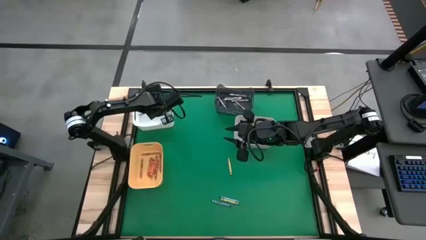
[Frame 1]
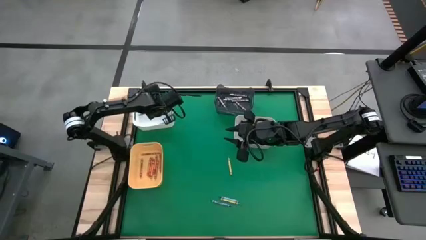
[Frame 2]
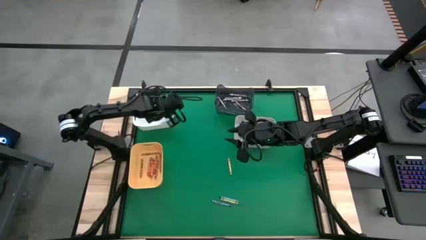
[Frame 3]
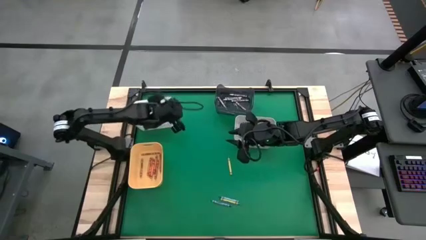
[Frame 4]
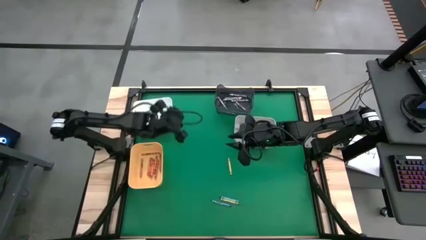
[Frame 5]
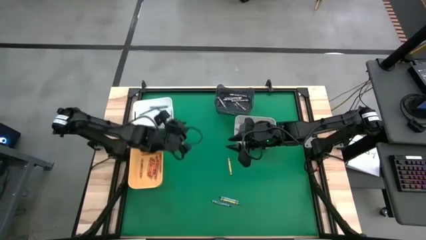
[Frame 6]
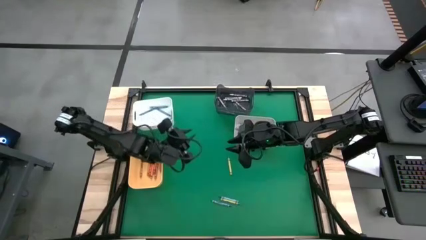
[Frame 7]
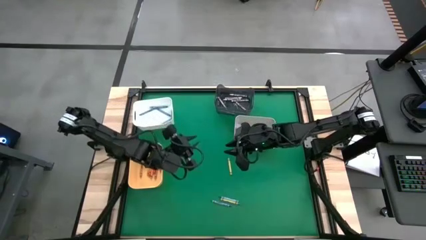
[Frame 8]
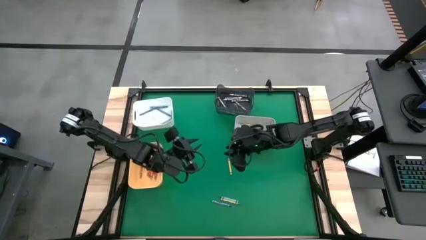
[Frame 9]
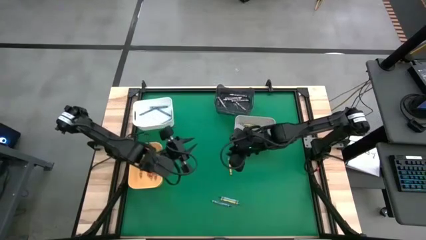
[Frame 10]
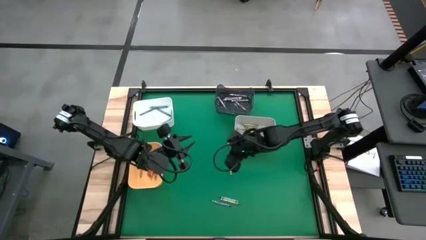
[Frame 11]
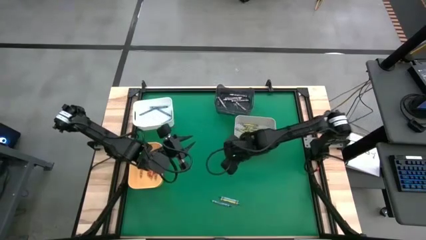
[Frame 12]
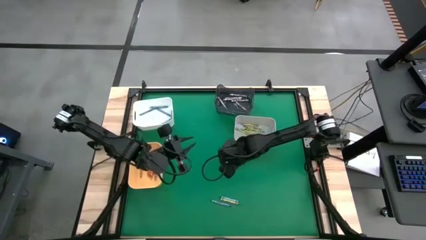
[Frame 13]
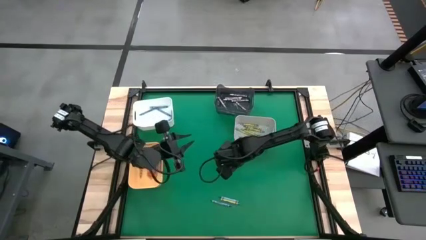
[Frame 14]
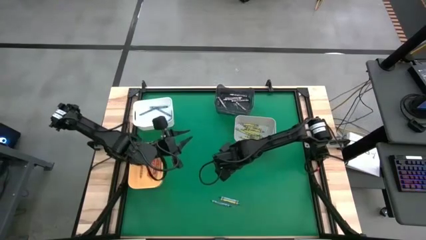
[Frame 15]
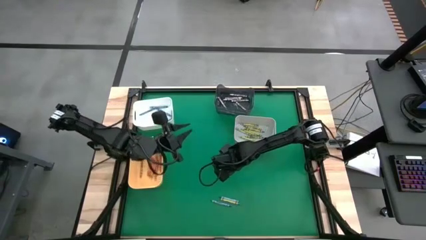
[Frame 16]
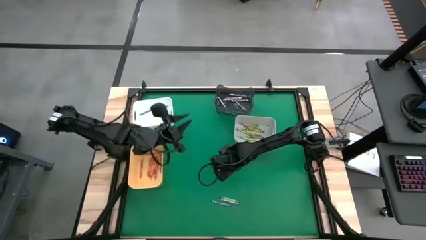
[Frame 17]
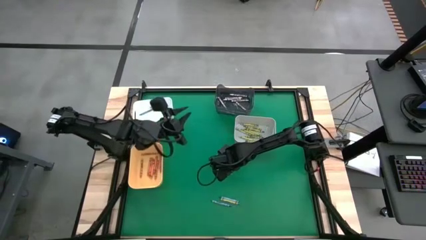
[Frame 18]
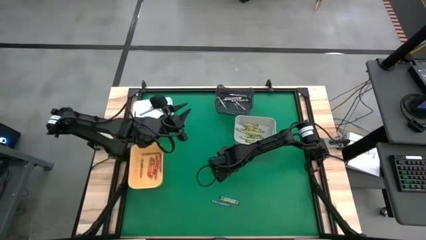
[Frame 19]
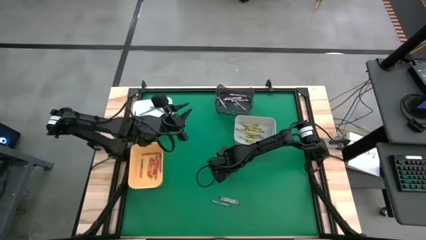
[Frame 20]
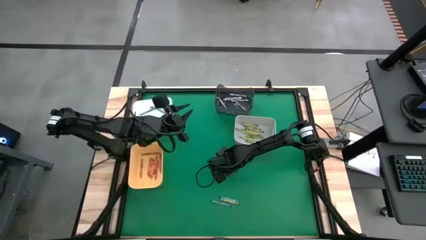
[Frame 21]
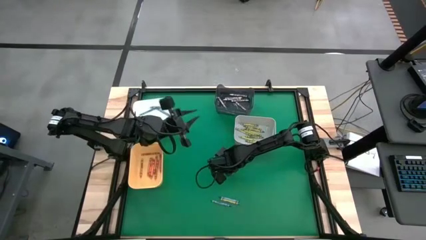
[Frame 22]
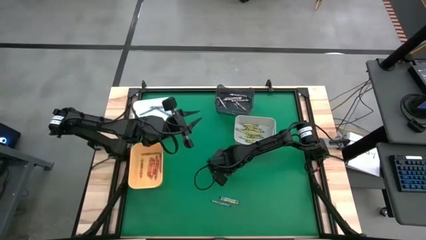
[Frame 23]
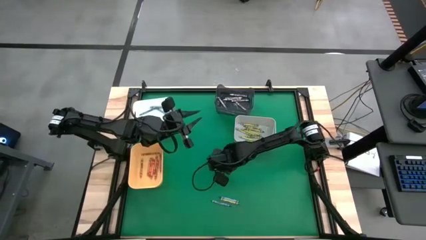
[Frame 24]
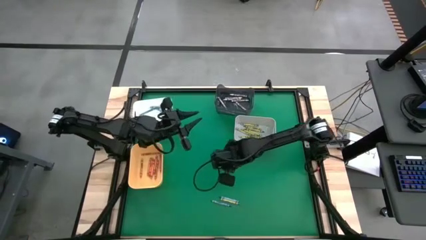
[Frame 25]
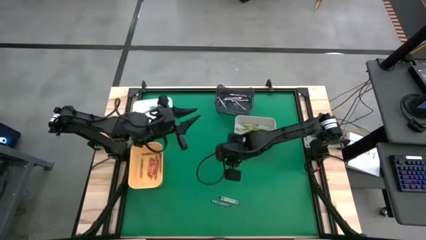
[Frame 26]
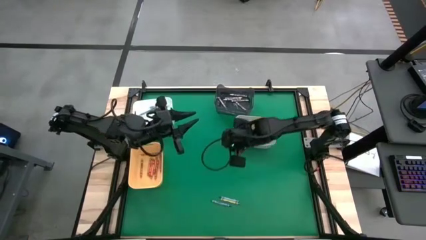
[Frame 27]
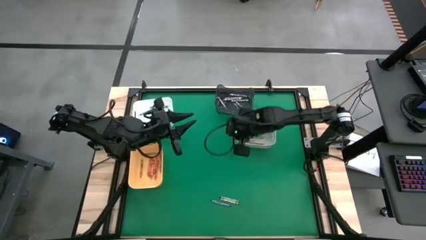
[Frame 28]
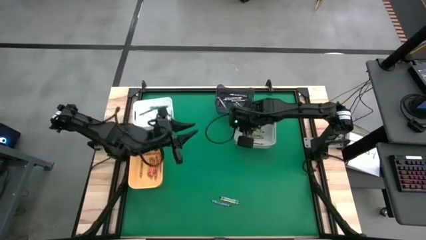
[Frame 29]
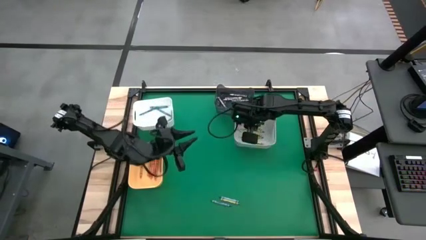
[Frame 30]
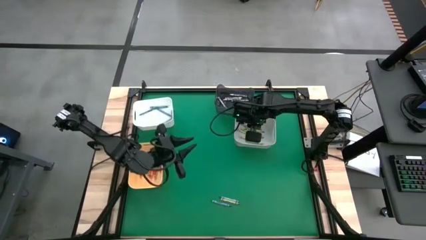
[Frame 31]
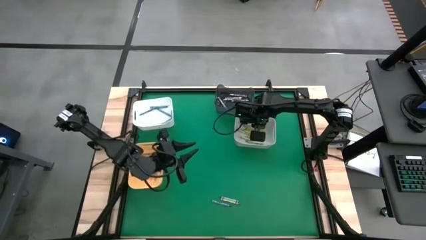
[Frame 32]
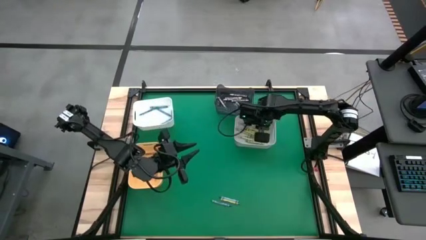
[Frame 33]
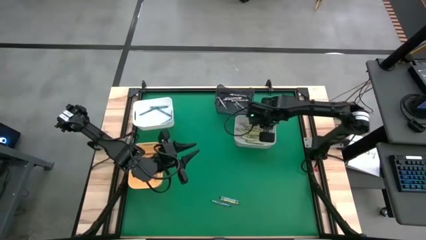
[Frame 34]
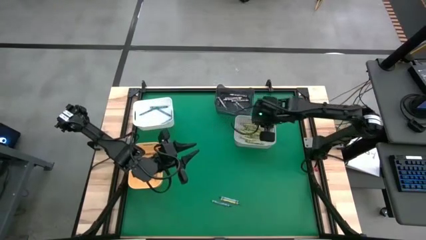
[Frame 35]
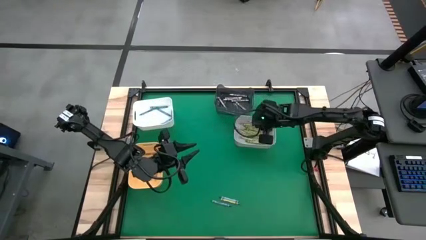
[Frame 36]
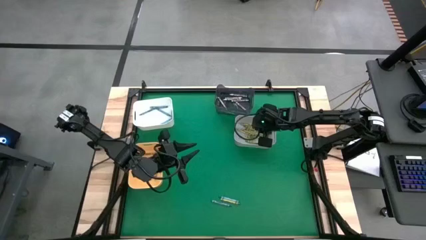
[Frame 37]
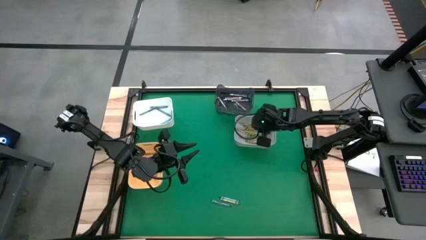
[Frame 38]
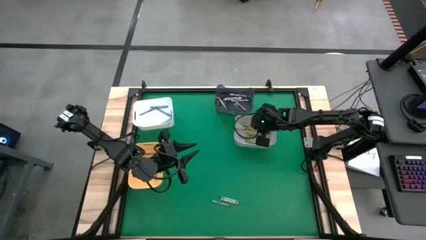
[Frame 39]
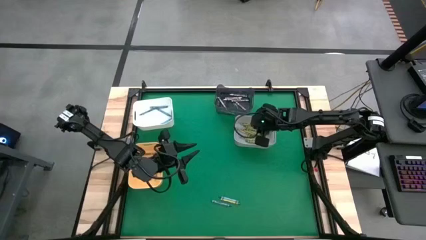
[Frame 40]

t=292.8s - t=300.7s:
Task: Sort crayons
Put the green crayon into the gray bin

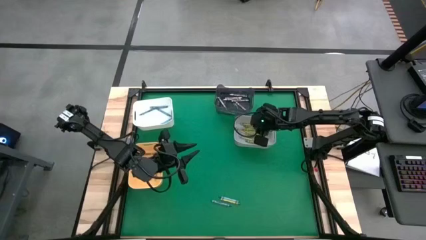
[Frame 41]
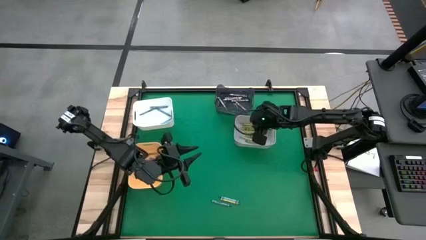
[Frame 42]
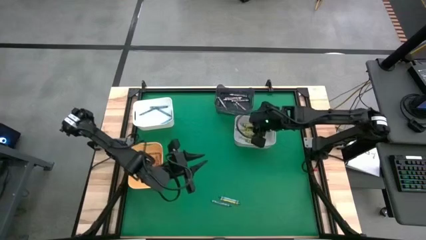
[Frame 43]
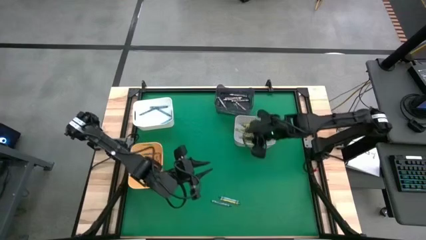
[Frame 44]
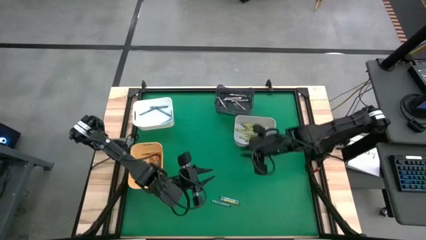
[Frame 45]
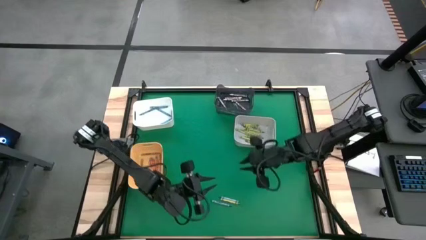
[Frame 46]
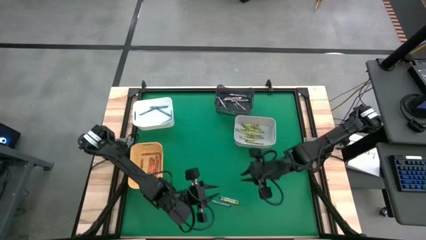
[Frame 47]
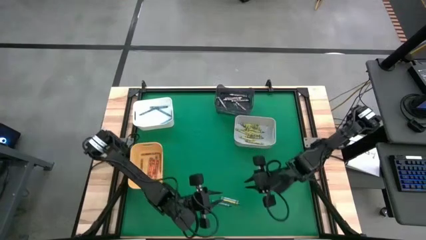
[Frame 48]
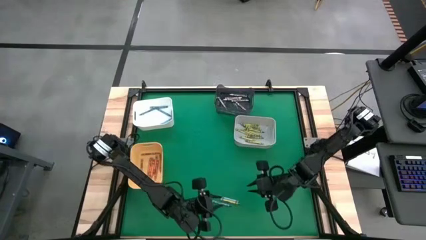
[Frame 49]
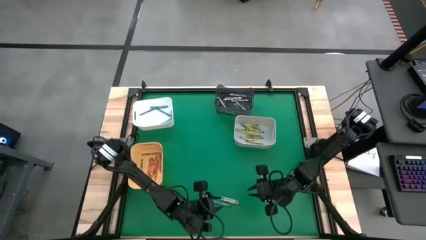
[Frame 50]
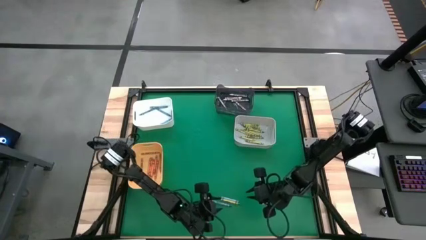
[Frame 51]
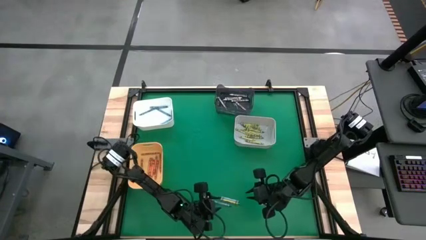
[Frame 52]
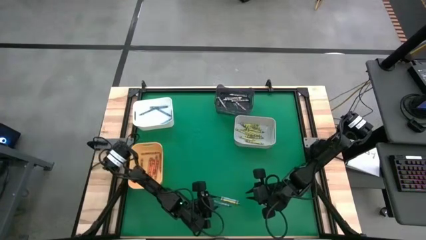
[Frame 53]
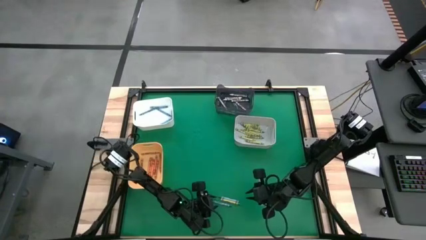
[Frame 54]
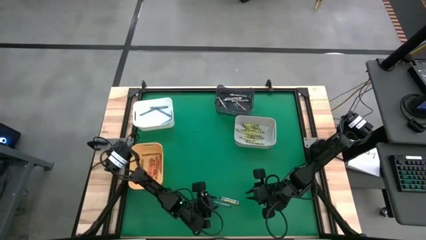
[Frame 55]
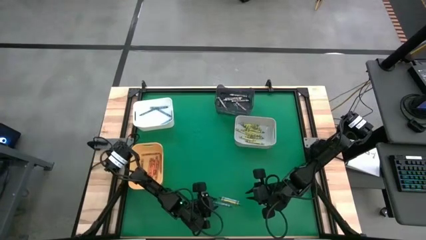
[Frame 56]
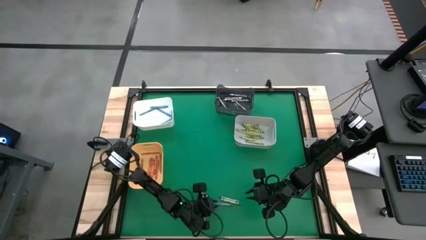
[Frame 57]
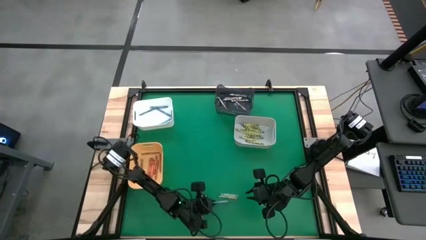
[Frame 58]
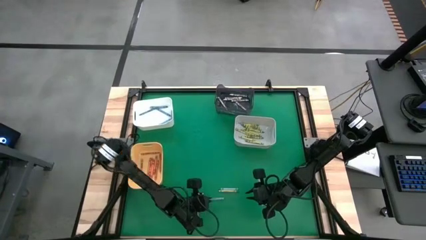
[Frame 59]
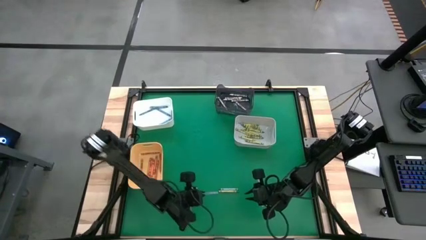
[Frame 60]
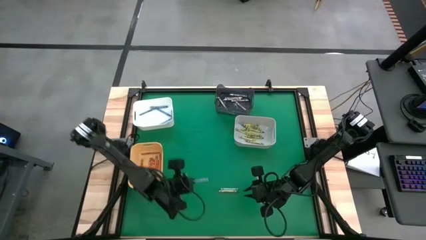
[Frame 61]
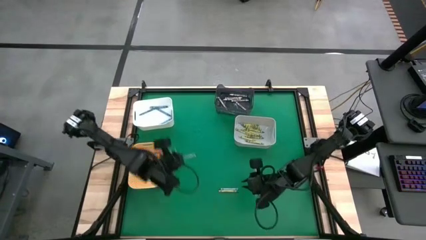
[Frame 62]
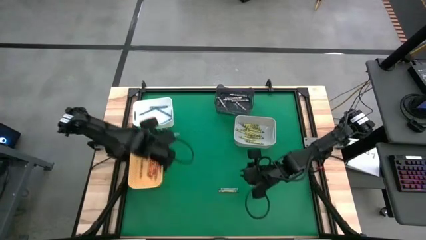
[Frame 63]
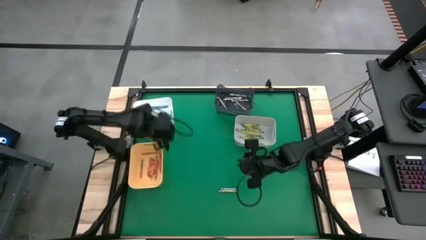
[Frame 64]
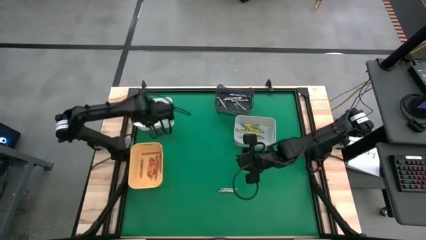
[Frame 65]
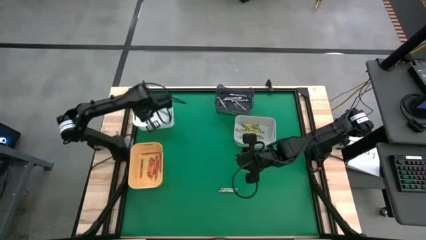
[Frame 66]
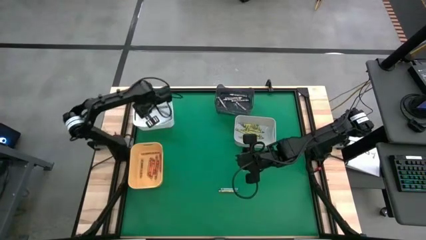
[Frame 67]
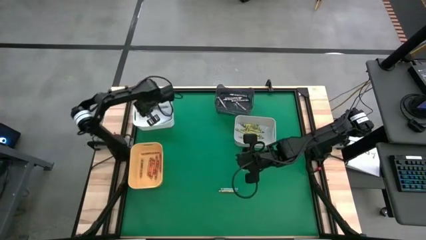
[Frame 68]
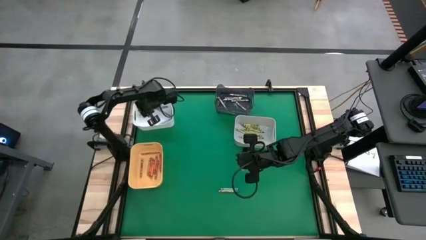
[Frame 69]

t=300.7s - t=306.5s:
Put the blue crayon into the white bin
